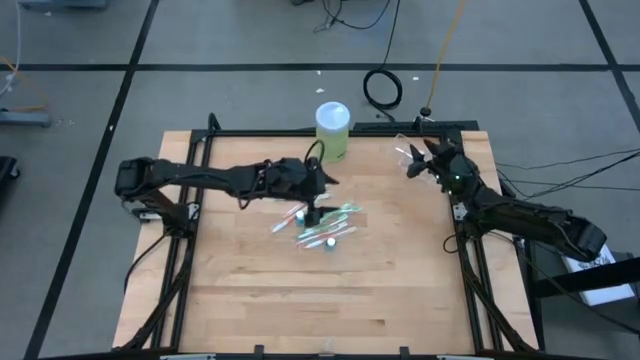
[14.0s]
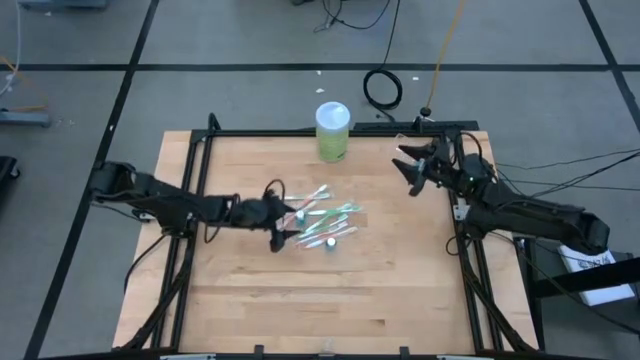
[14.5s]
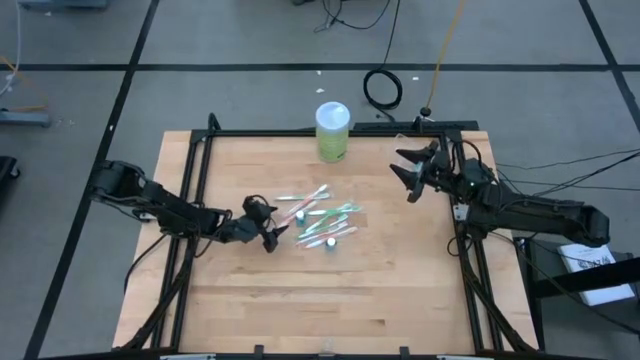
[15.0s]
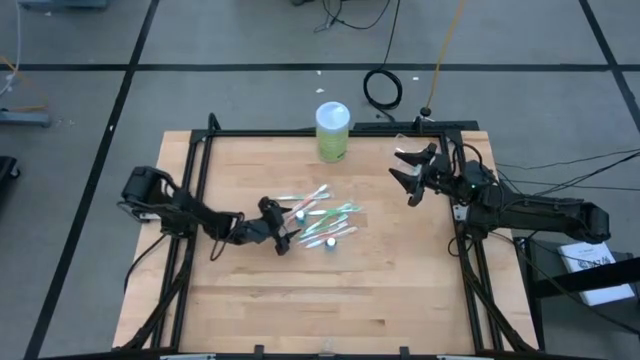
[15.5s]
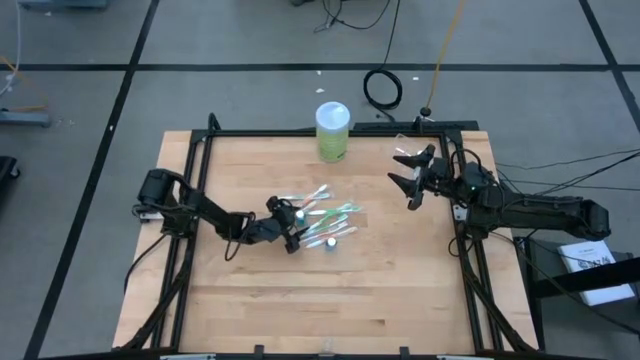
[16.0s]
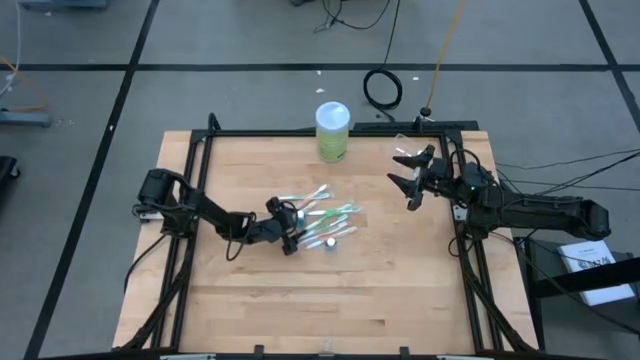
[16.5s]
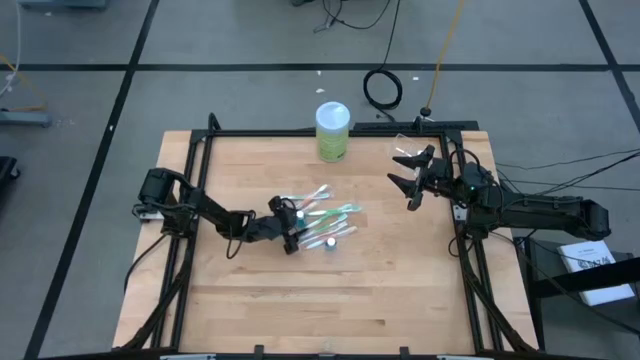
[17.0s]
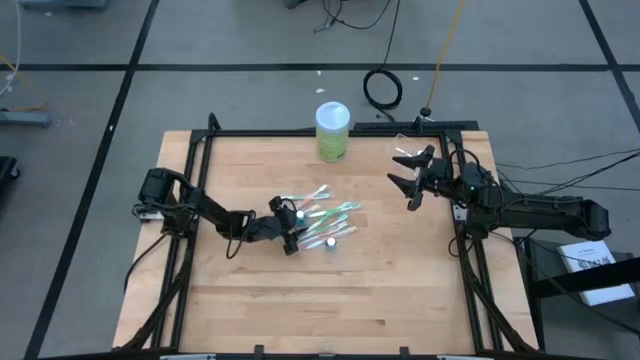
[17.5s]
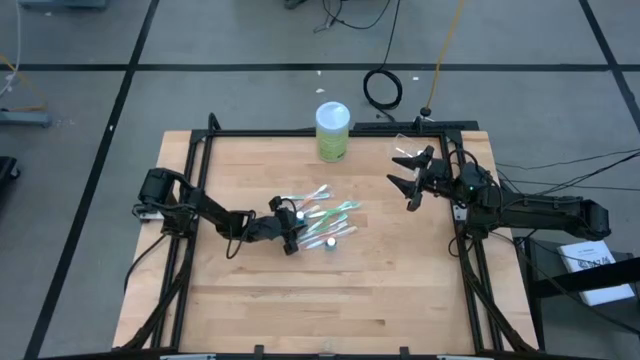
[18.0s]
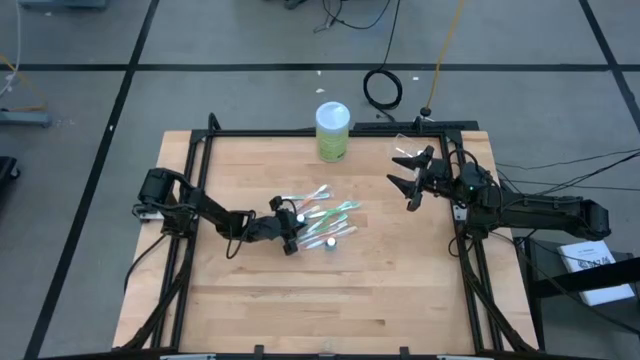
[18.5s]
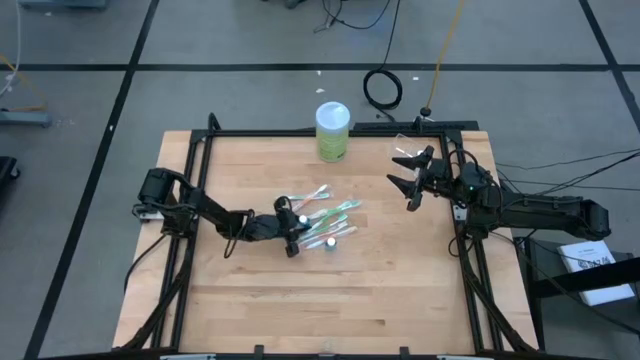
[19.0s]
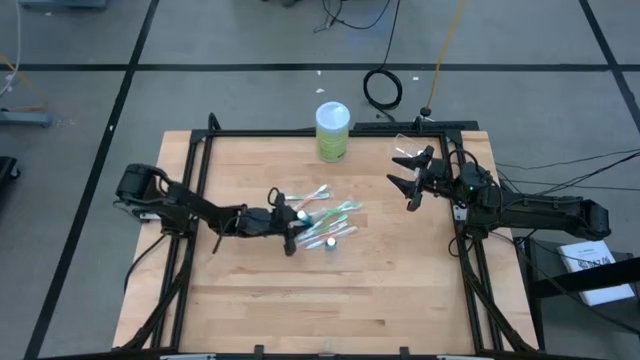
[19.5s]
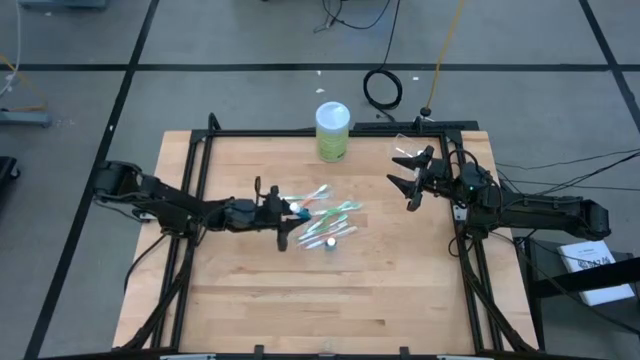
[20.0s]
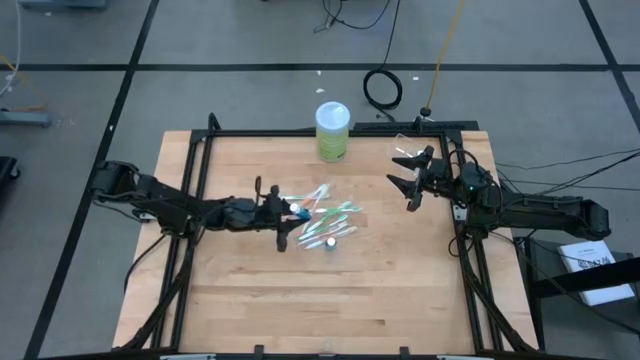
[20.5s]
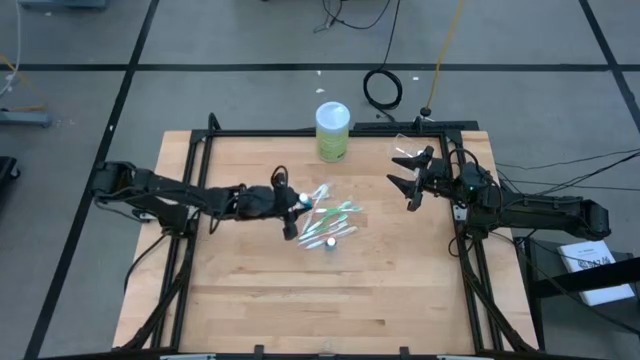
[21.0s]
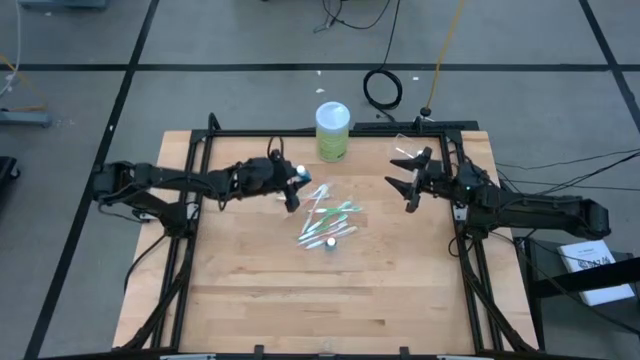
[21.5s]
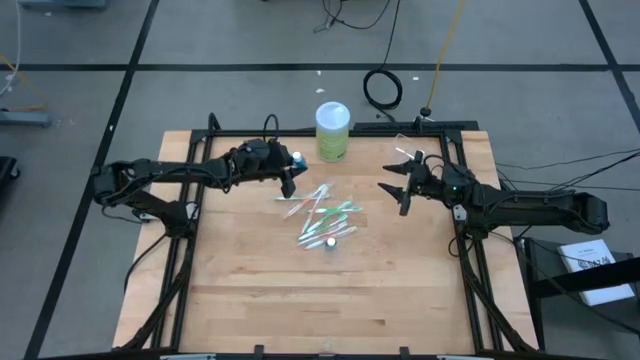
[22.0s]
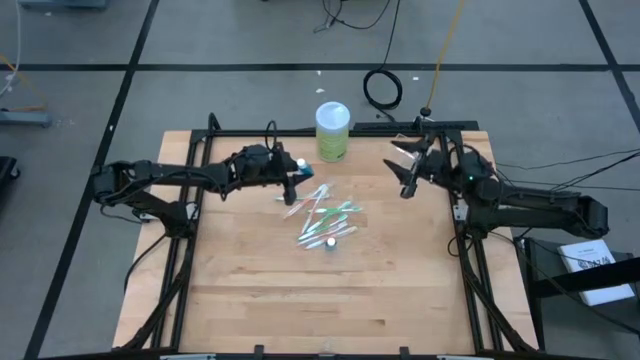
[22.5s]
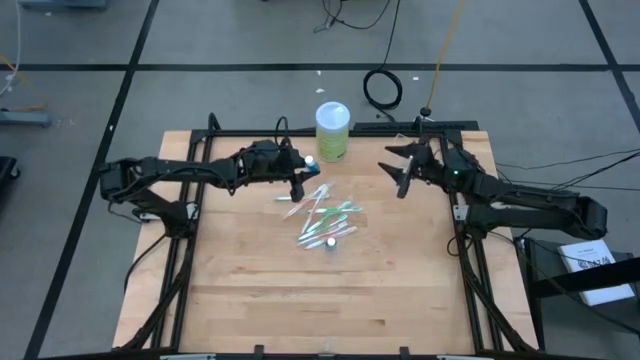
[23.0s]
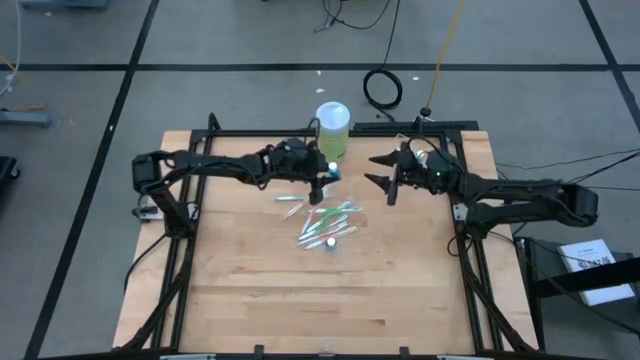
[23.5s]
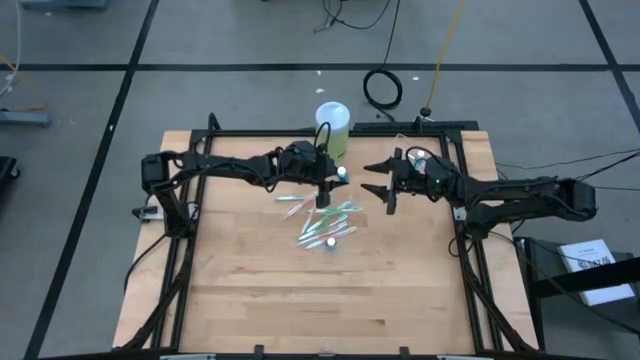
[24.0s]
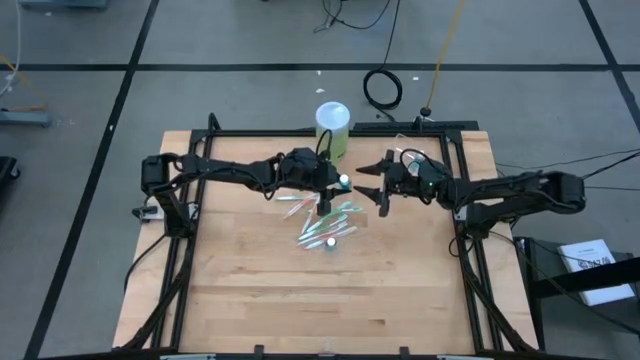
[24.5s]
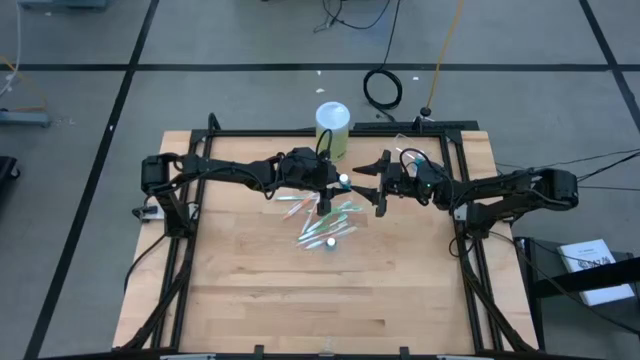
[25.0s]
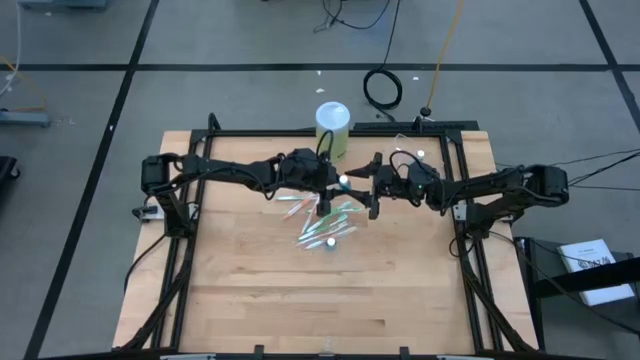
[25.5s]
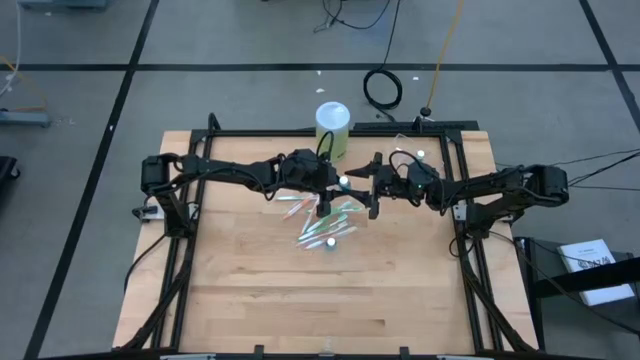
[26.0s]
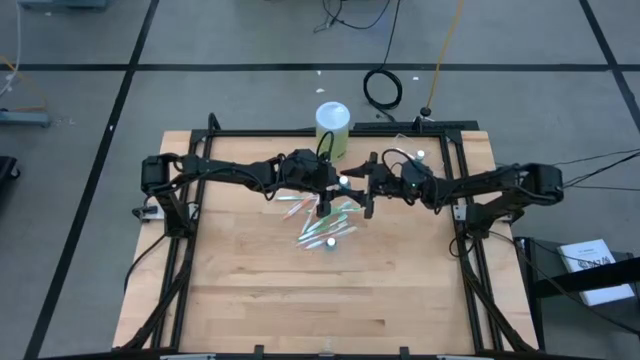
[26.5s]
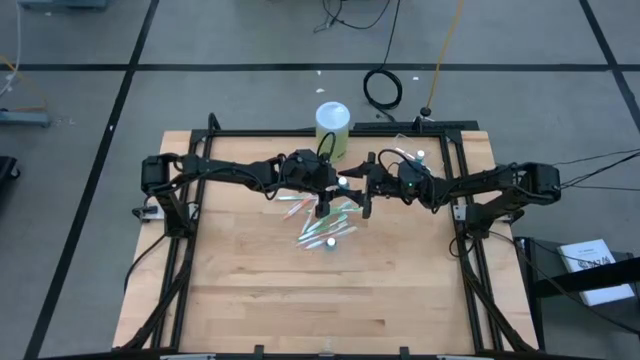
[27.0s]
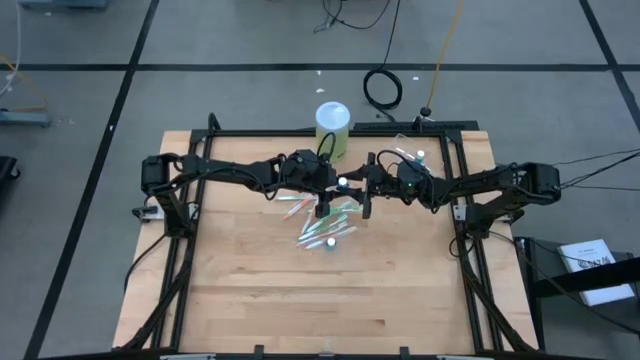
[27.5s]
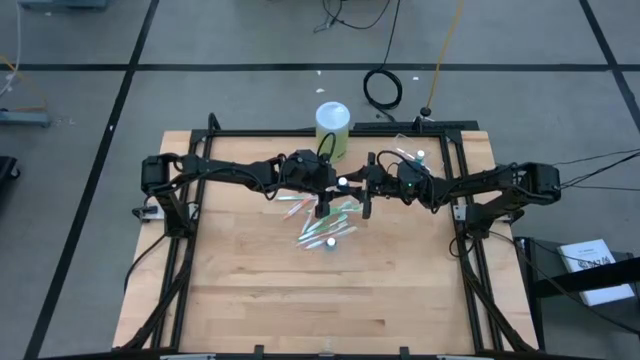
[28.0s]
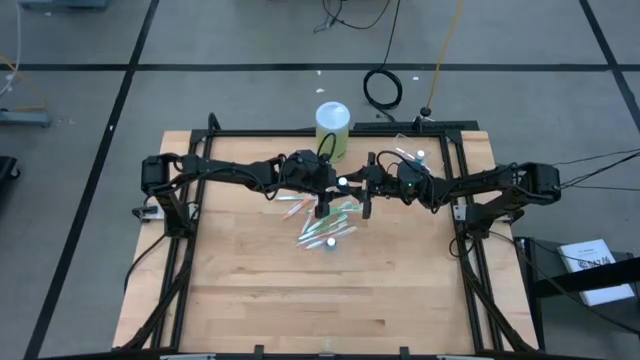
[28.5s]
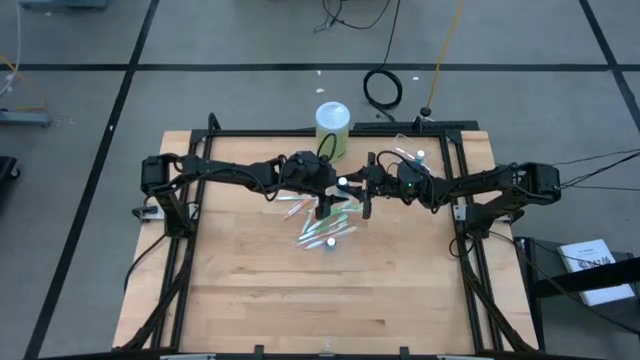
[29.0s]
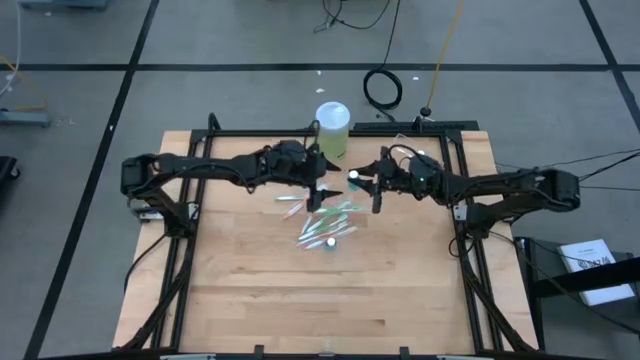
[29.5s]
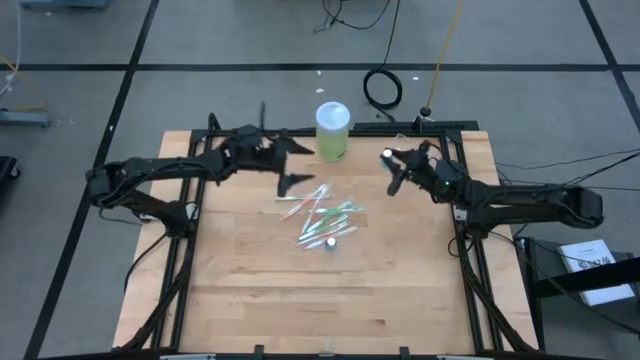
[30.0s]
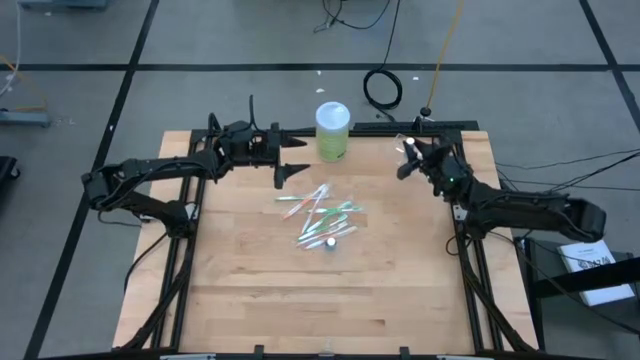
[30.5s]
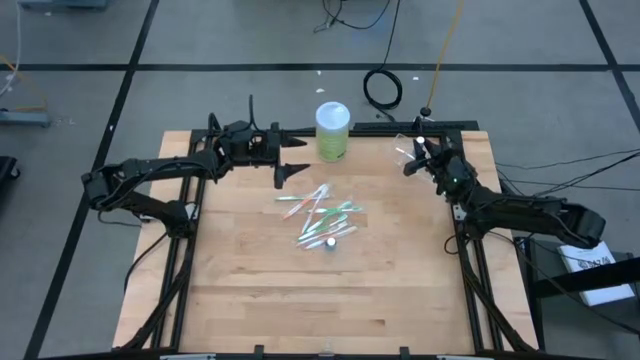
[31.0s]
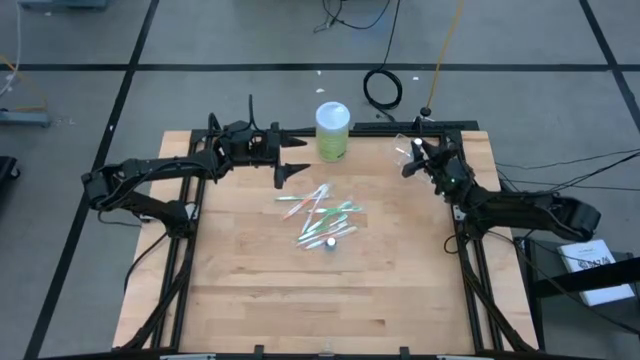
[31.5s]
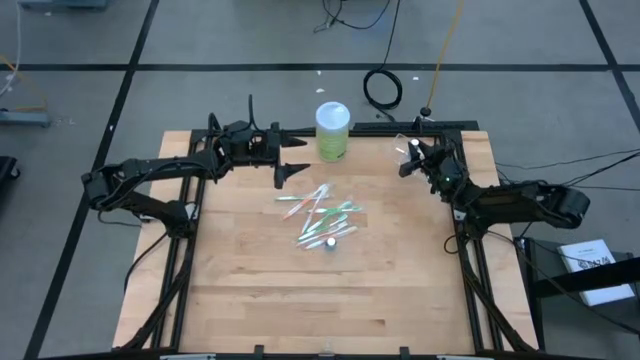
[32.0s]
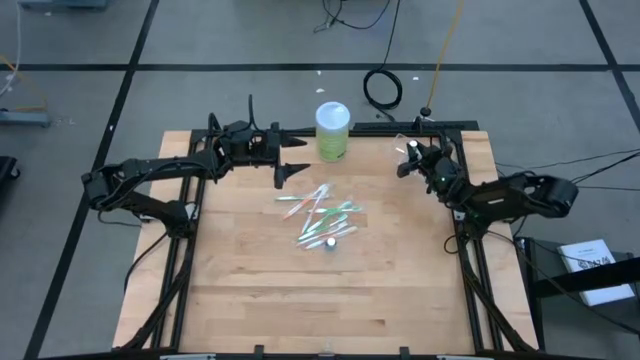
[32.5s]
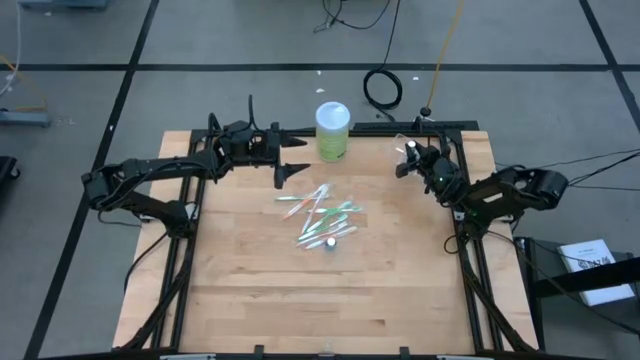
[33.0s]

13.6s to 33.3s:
Task: Pick & Place toothbrushing station
Put the blue mouthwash bottle into the transparent organizer

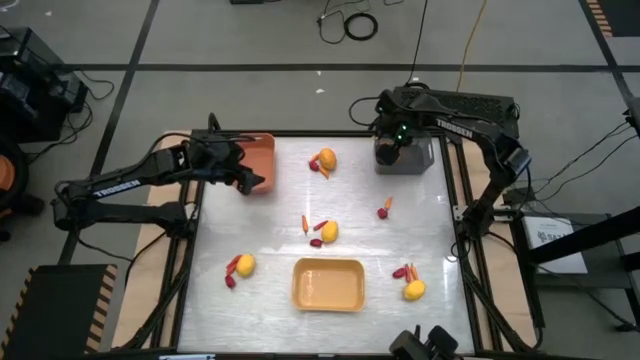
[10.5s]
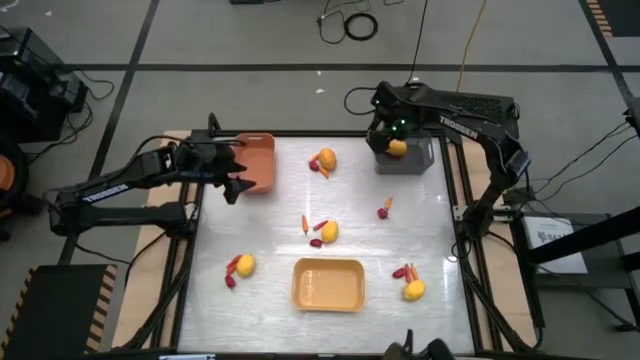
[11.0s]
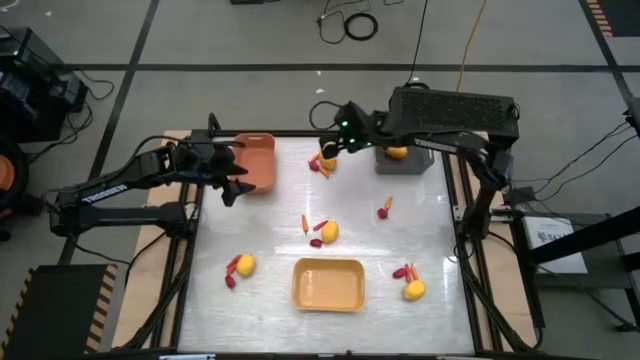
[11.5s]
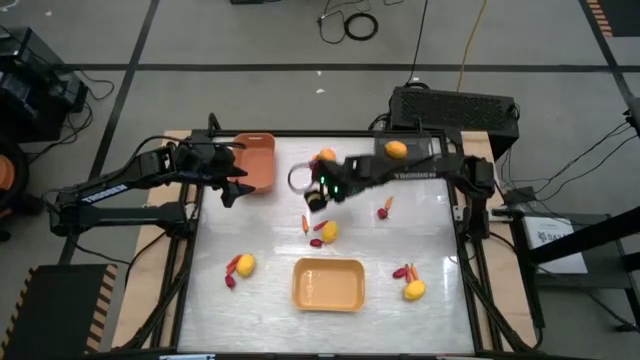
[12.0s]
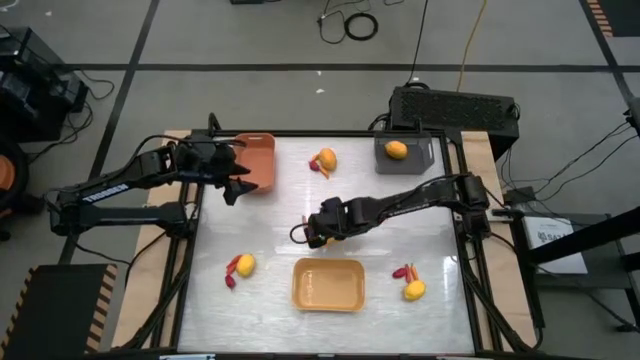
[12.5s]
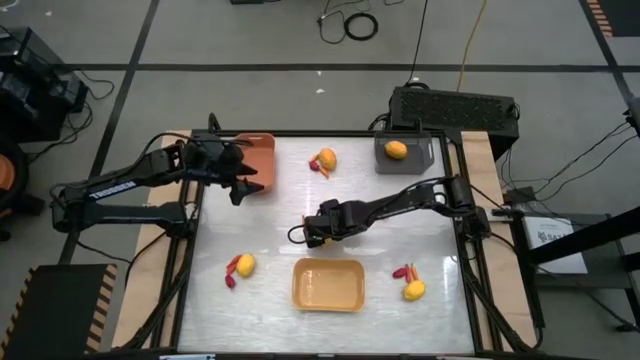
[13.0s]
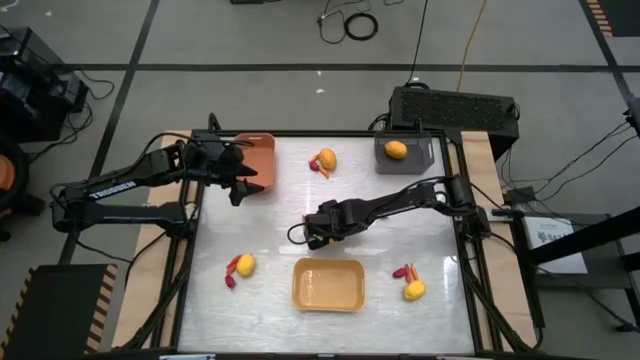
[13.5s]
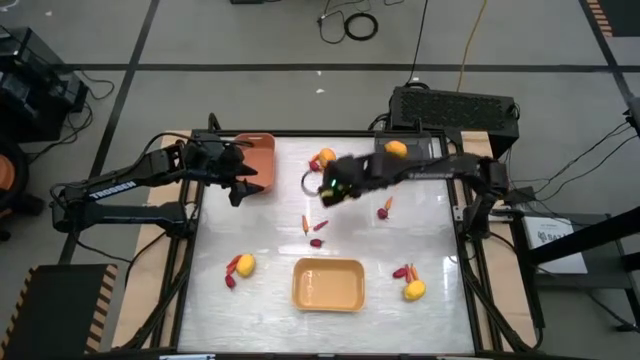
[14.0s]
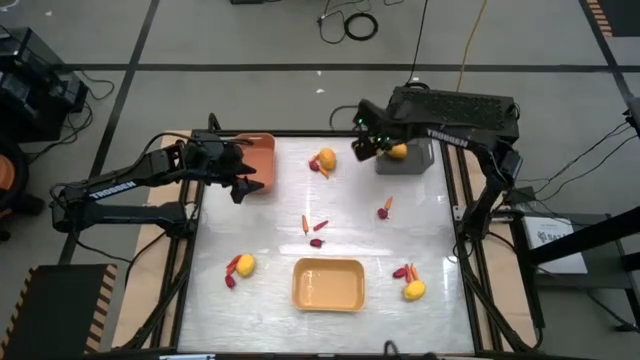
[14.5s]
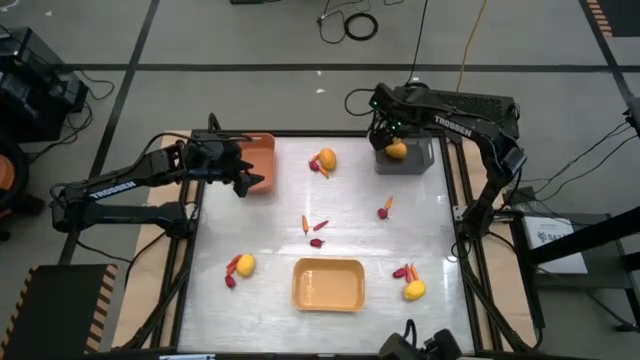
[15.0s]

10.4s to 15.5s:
Task: Sort produce into baskets
Put the lemon into the gray bin
